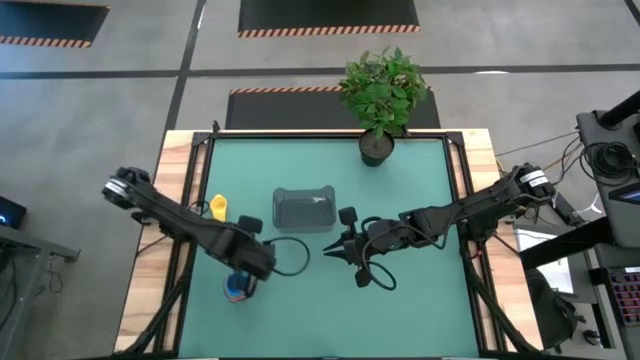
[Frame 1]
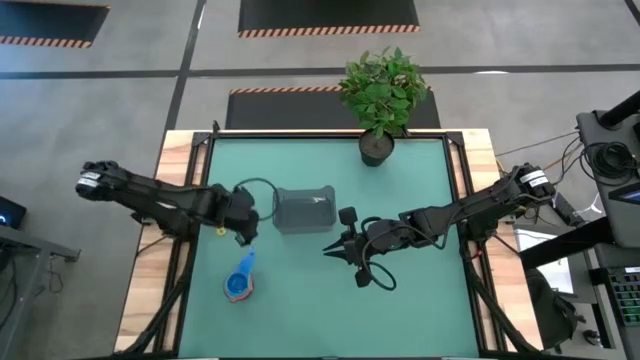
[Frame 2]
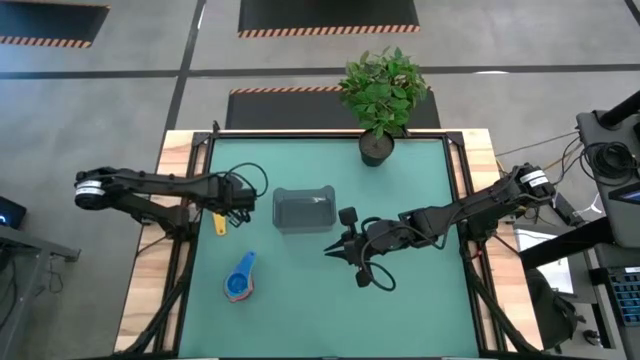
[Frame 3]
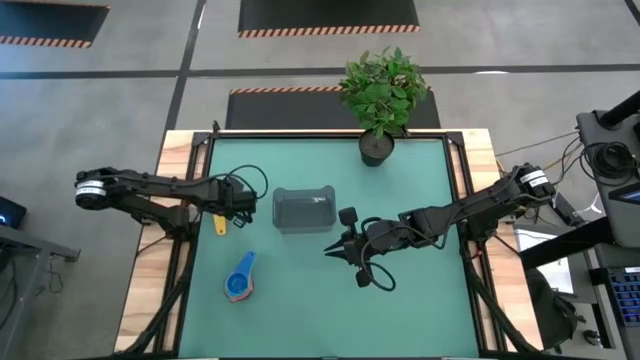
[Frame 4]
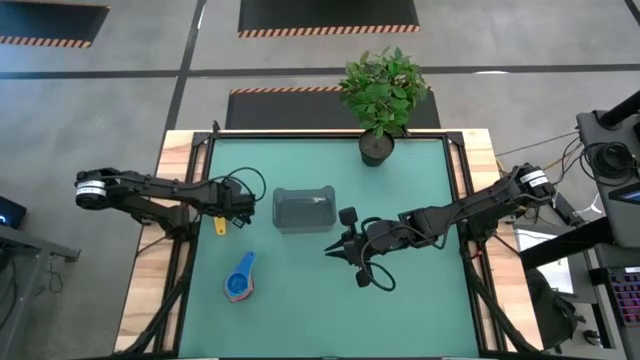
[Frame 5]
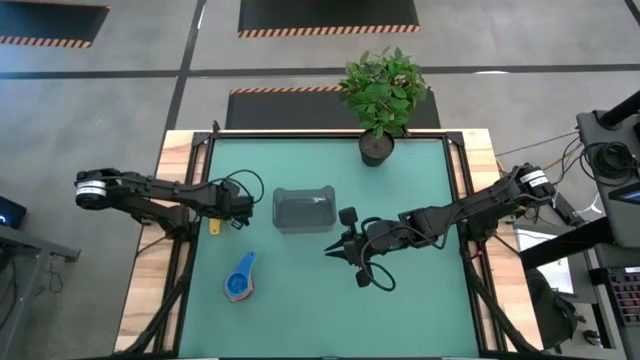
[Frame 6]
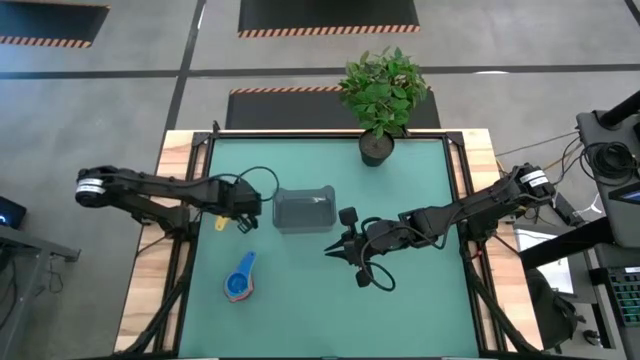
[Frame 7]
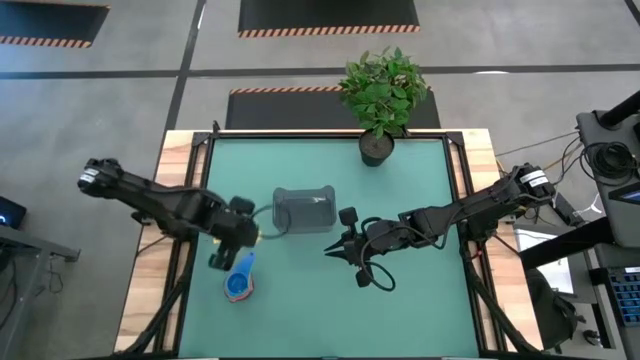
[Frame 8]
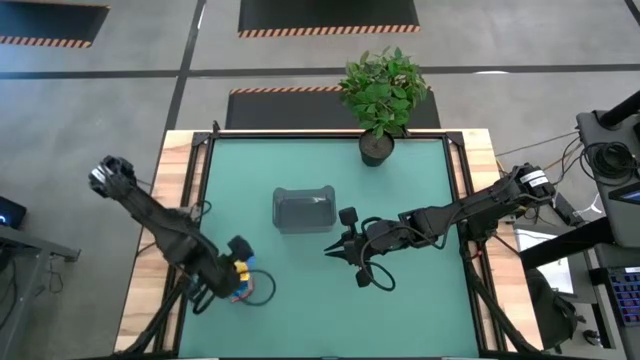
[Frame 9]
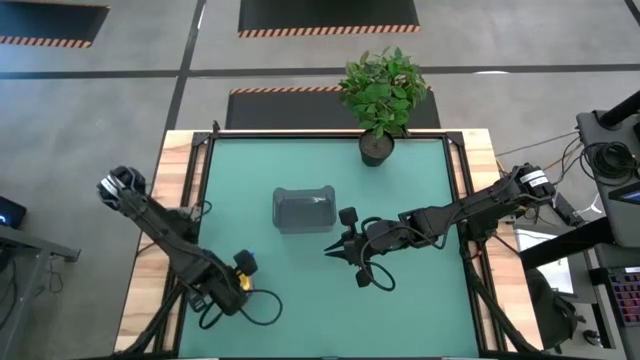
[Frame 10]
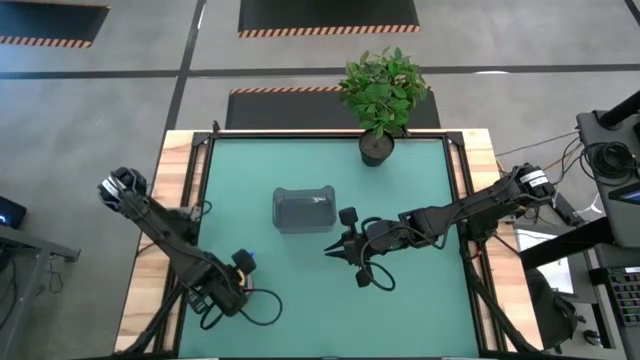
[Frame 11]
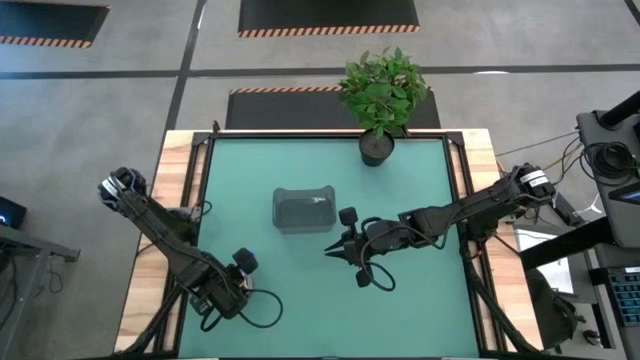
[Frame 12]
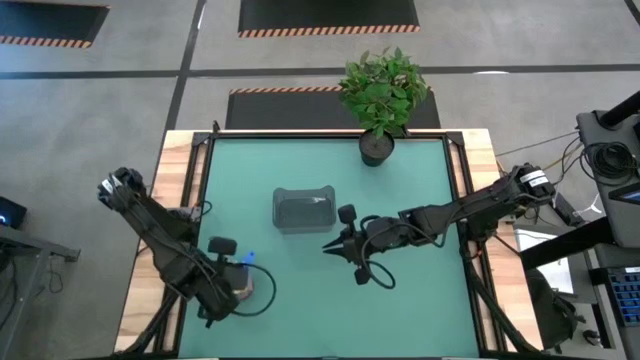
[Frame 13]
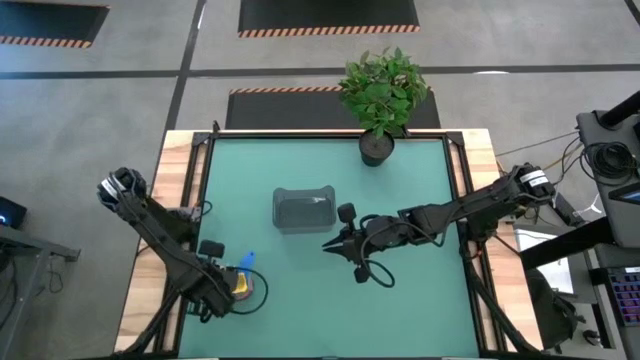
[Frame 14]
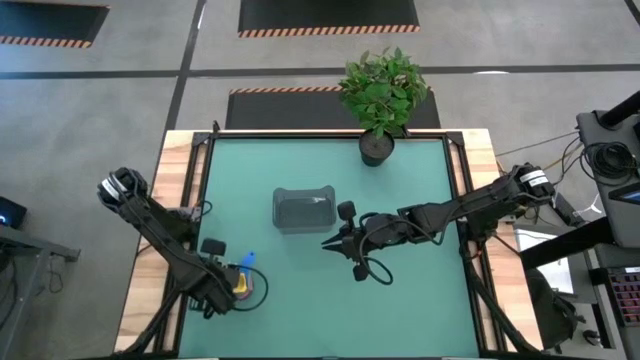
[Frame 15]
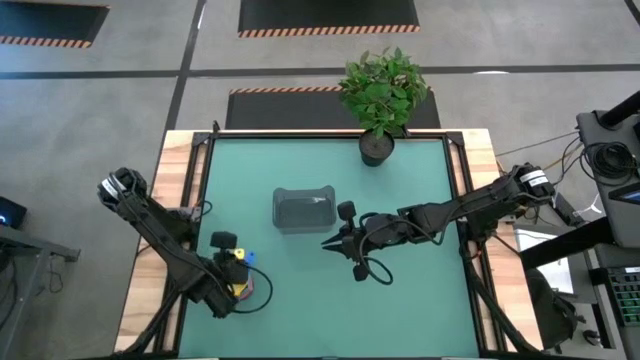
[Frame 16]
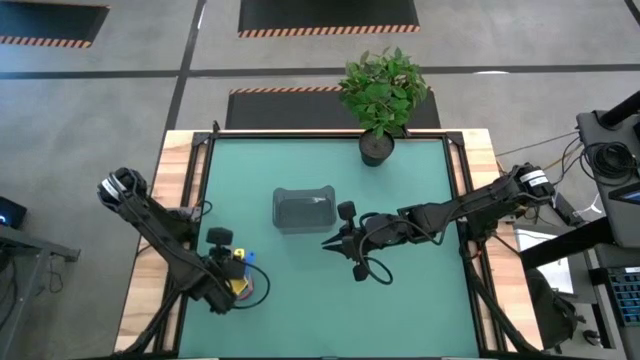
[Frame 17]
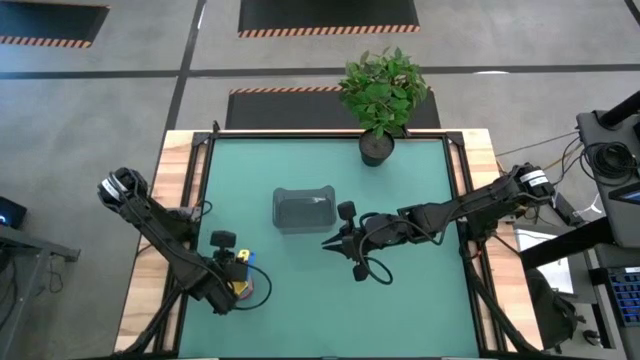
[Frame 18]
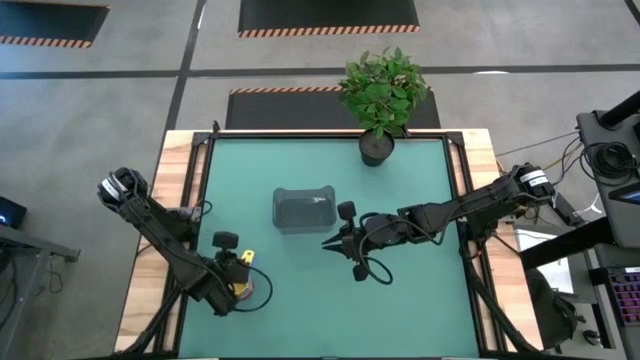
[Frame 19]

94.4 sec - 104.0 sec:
Task: Nest measuring cups in basket
Stack the yellow measuring cup on top of the blue measuring cup

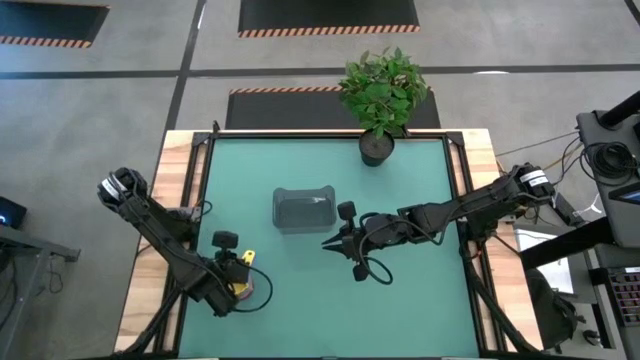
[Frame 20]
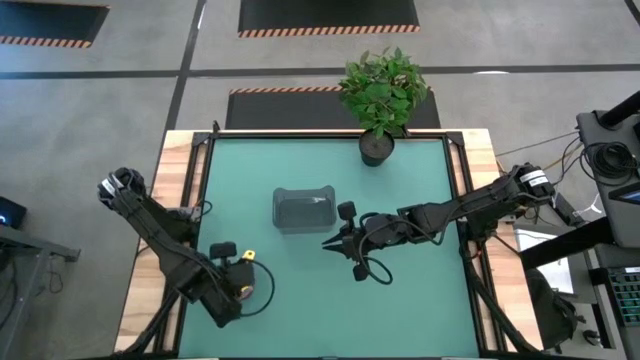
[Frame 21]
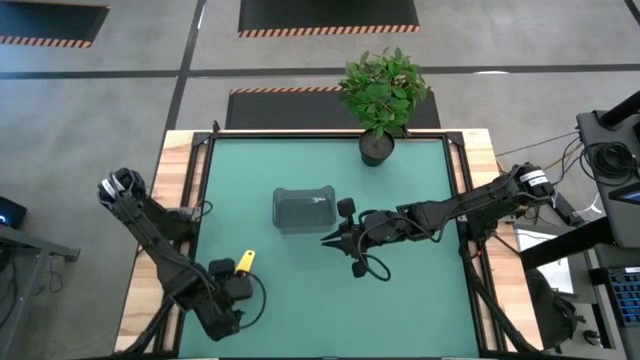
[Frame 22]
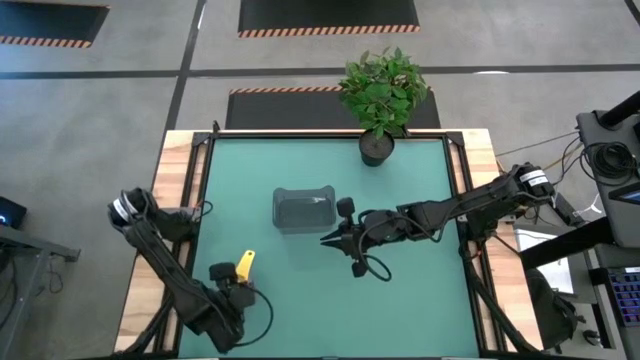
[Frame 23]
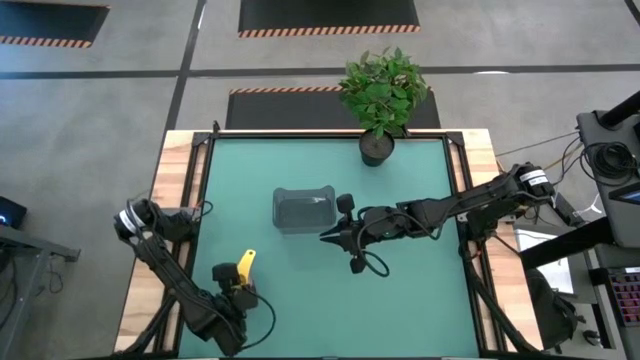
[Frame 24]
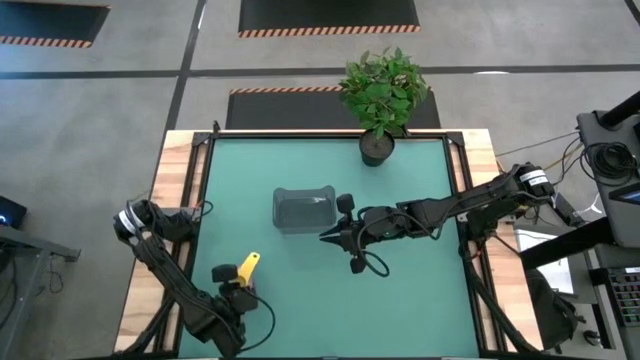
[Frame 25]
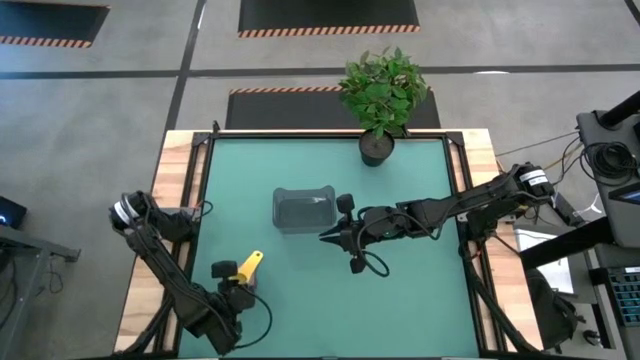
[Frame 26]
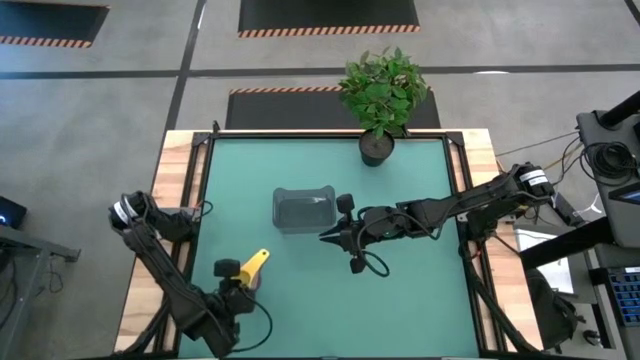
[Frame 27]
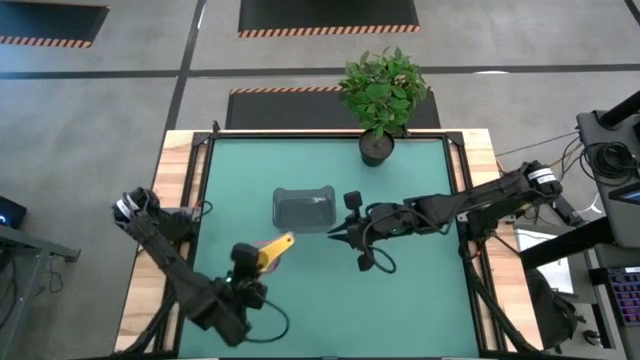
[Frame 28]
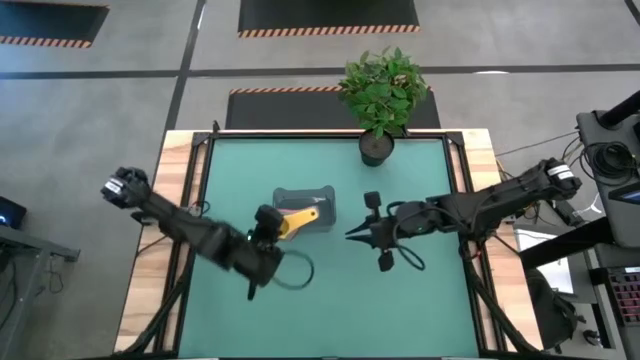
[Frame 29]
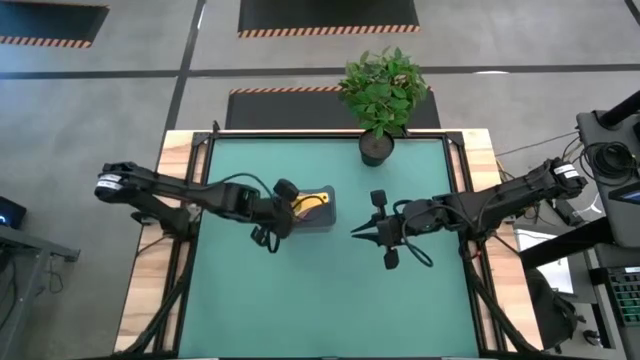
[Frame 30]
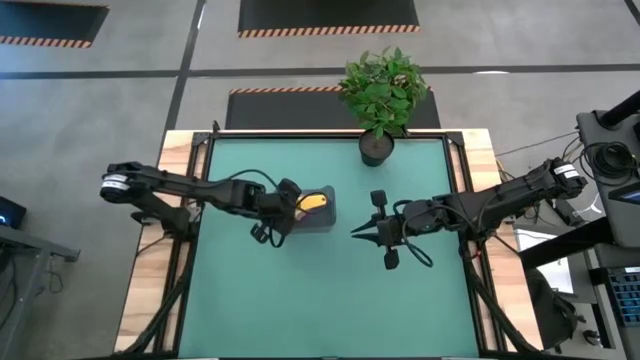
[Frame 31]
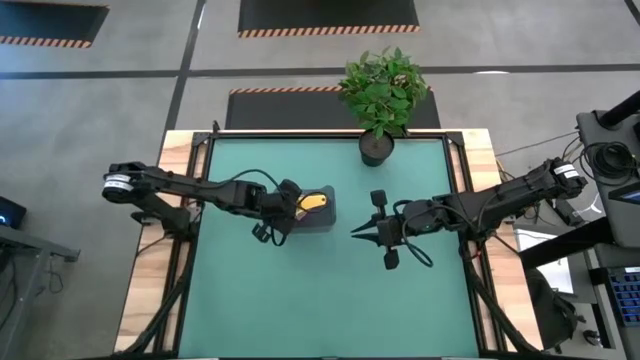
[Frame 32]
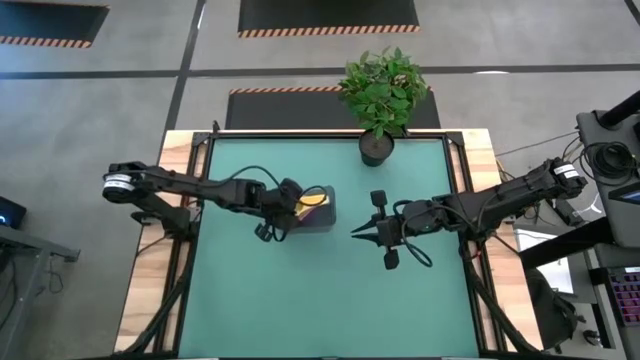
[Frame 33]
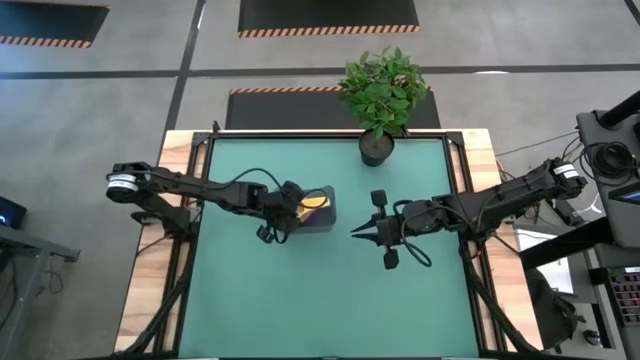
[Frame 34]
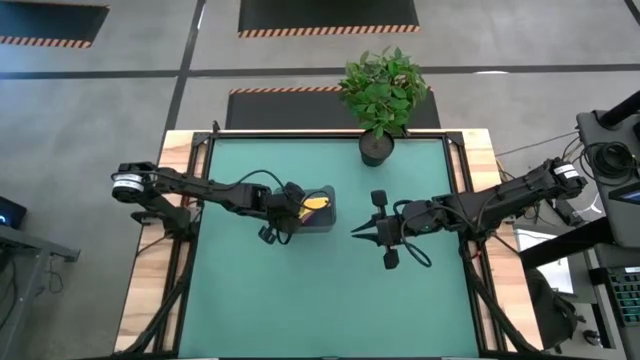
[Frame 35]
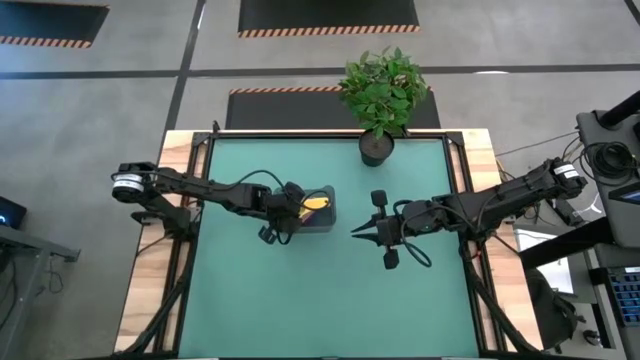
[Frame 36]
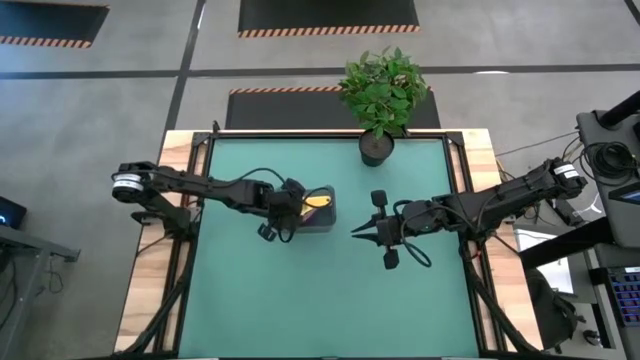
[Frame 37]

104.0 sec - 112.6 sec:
Put the nested measuring cups into the black bin

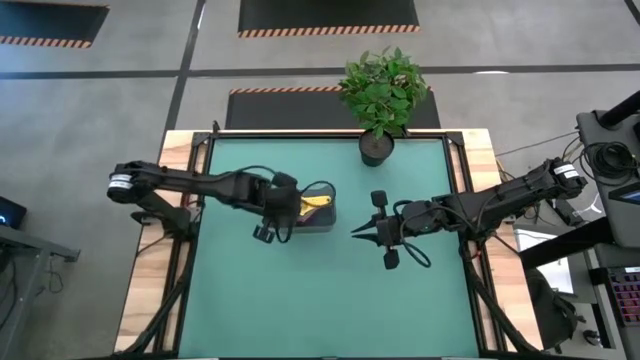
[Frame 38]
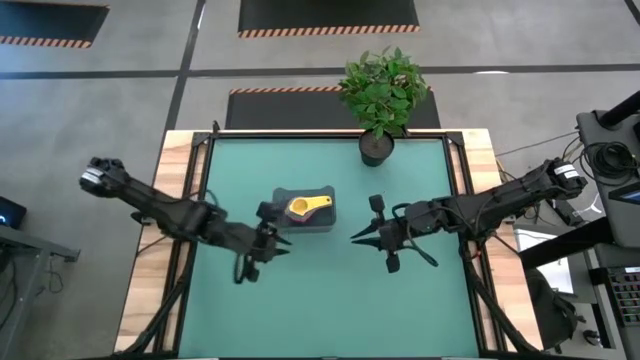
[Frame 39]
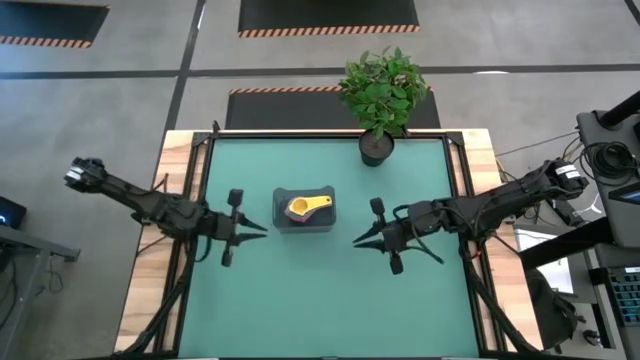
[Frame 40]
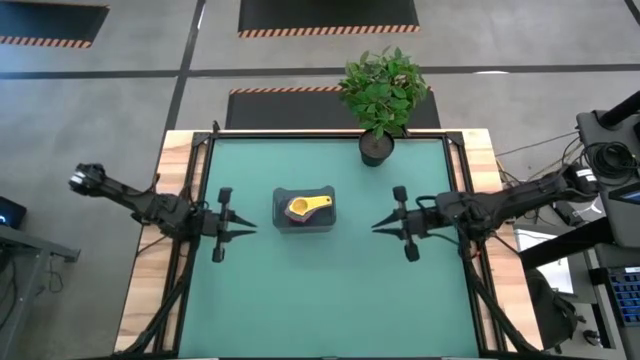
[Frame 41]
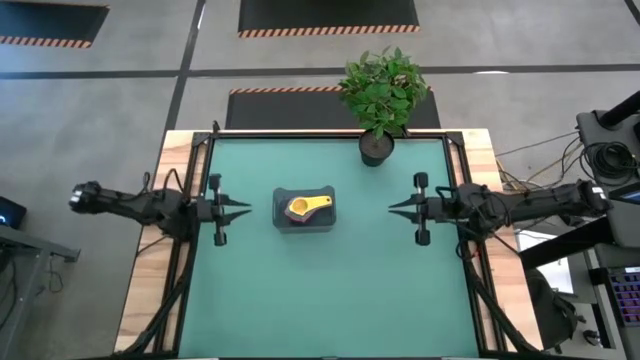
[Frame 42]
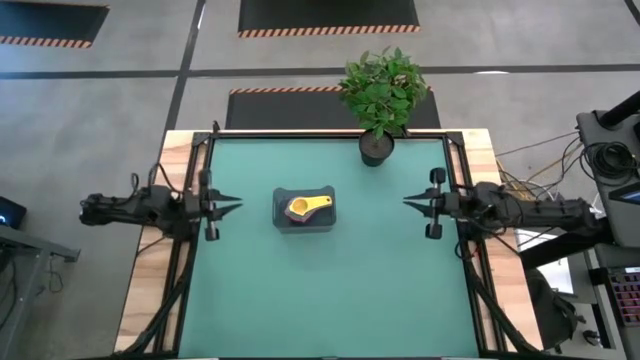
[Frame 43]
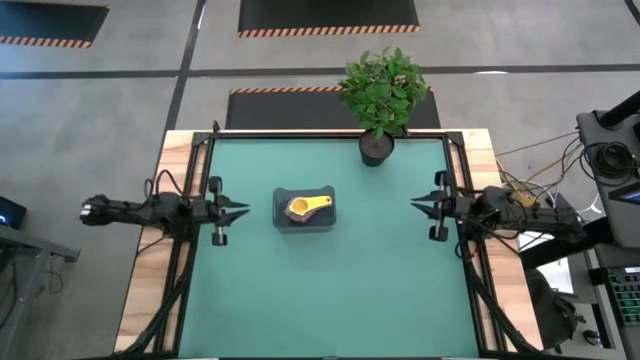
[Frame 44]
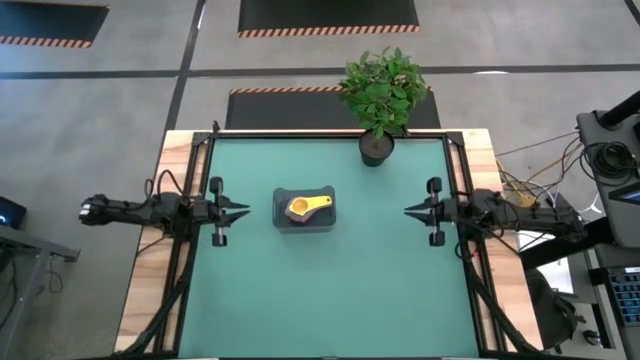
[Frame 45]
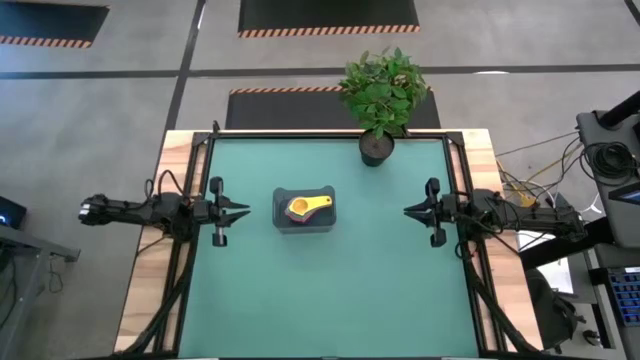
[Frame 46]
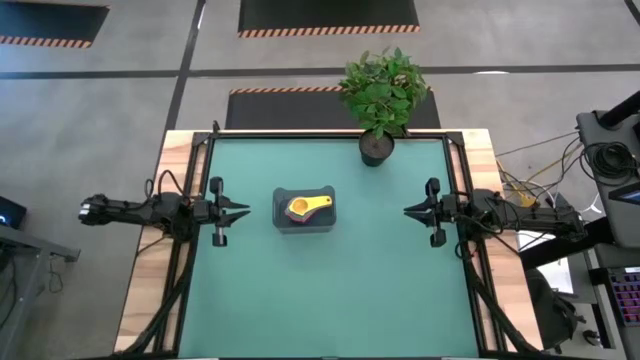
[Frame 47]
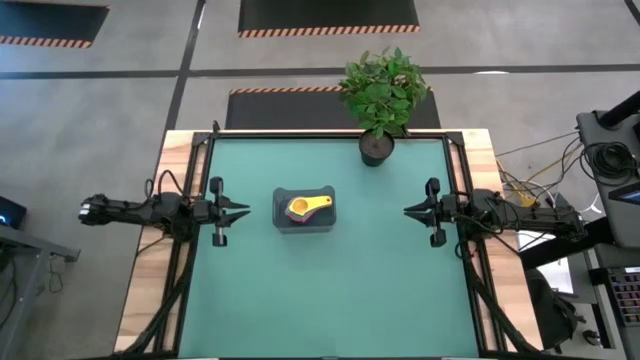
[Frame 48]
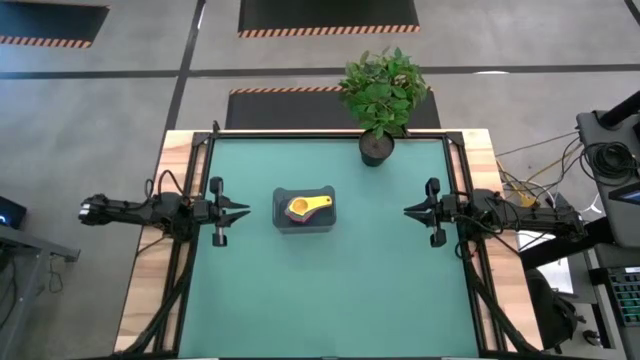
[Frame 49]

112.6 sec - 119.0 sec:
Return to Home Position
